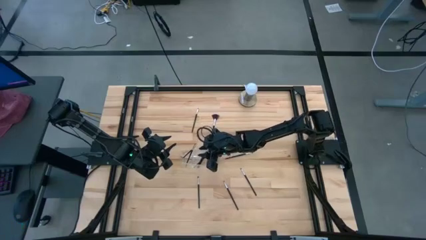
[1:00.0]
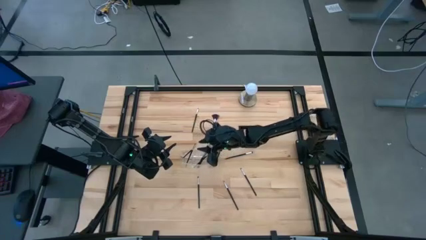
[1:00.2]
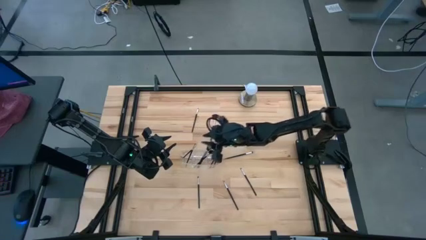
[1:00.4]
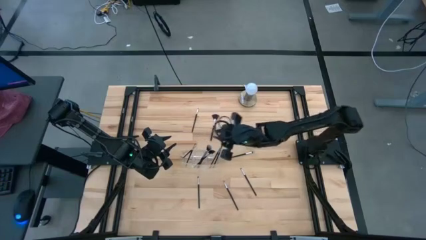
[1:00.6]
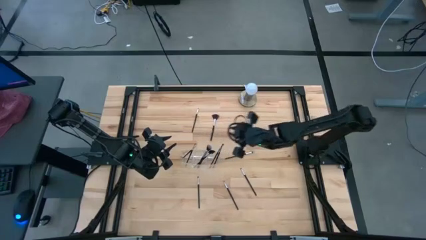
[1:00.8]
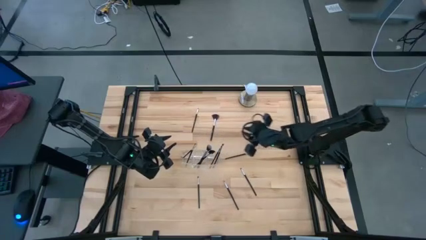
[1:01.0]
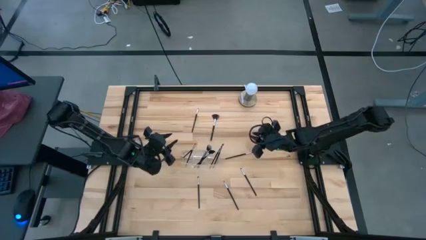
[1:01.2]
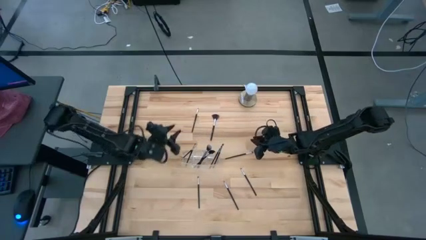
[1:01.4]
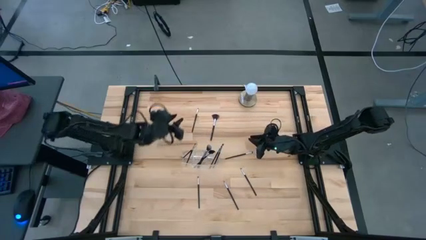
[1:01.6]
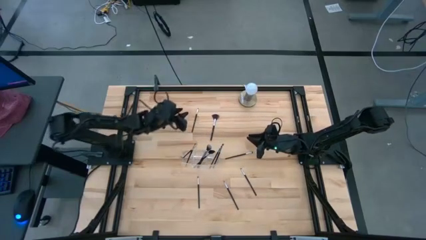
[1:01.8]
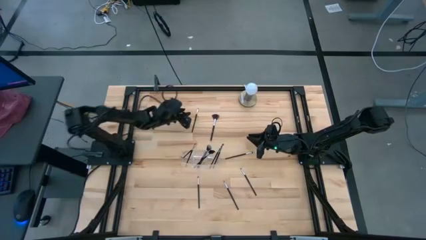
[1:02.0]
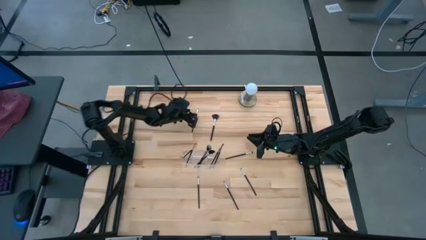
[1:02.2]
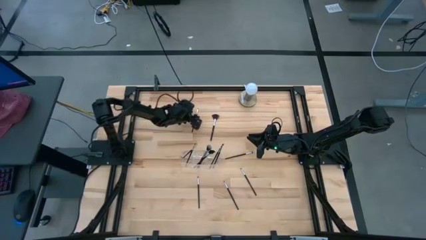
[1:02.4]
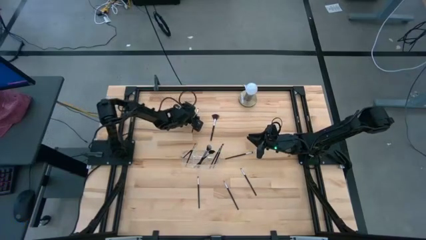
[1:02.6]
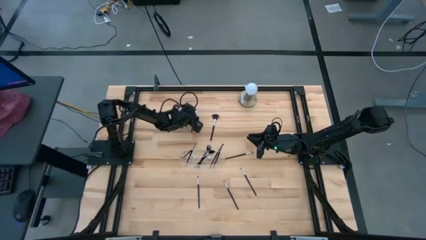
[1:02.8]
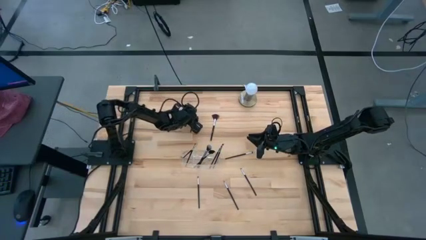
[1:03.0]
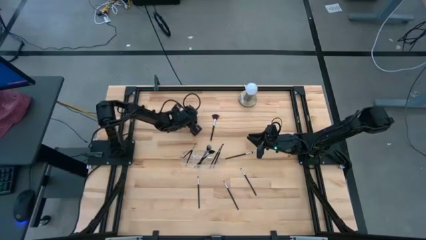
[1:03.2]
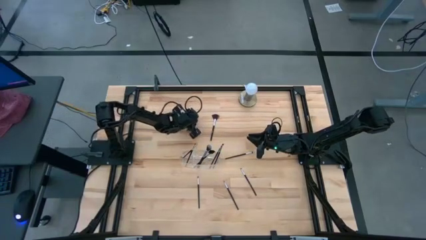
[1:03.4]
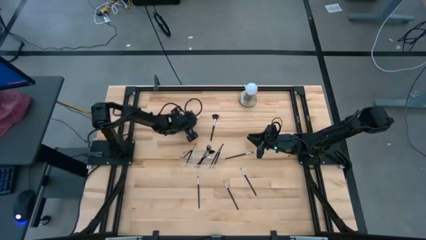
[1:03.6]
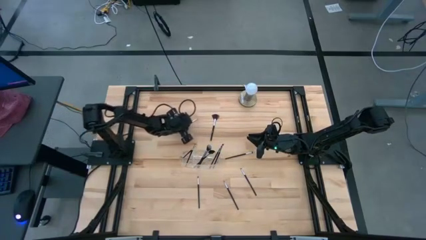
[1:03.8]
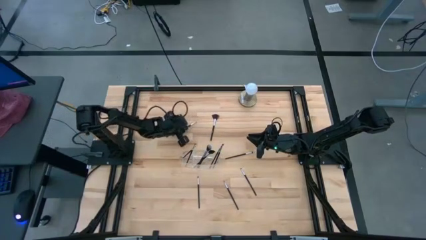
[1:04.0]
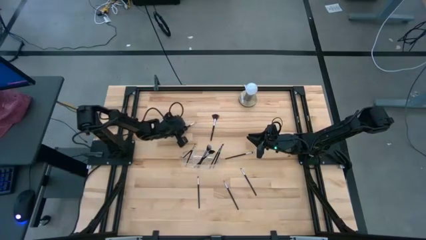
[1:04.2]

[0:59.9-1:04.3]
Task: Put items in baskets/containers
Put the eyeshadow brush into the transparent organizer

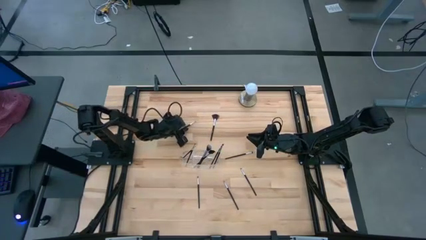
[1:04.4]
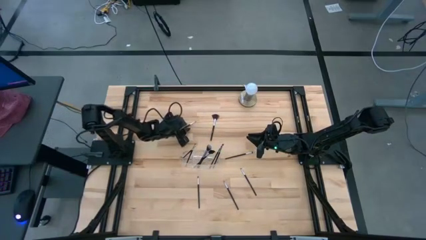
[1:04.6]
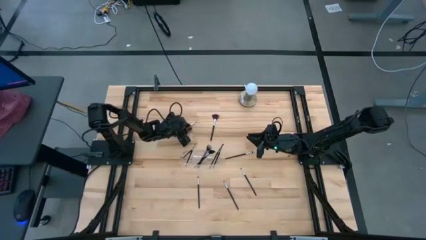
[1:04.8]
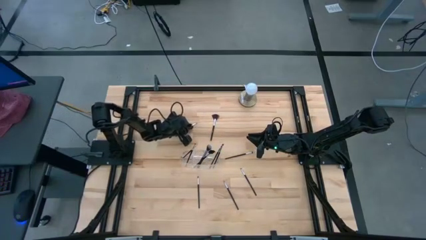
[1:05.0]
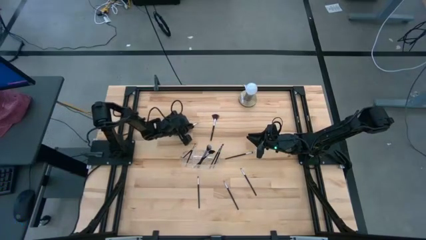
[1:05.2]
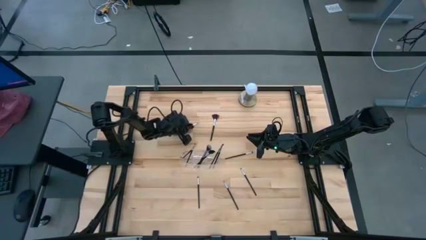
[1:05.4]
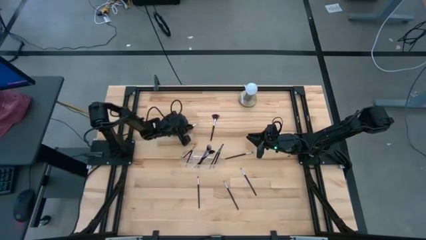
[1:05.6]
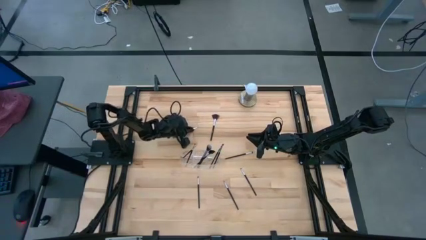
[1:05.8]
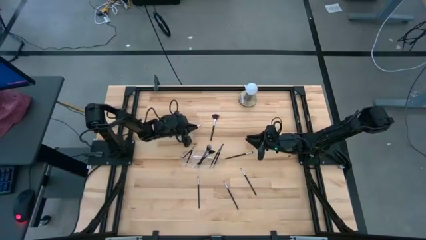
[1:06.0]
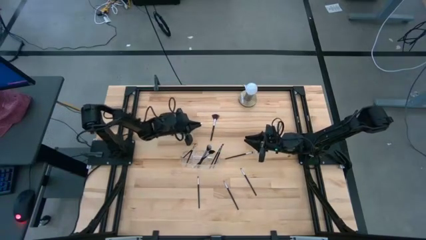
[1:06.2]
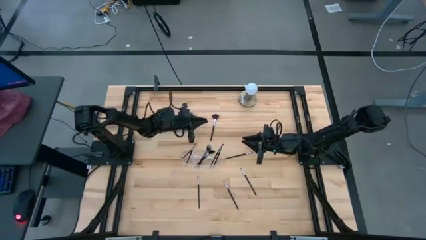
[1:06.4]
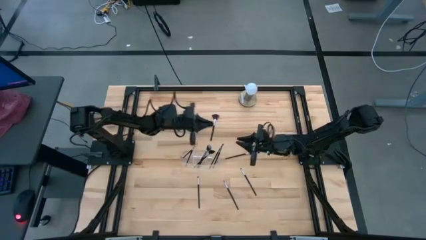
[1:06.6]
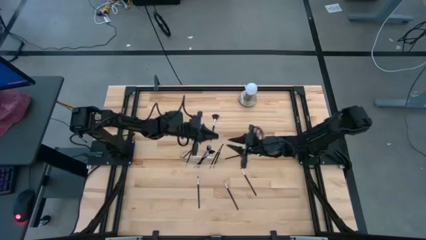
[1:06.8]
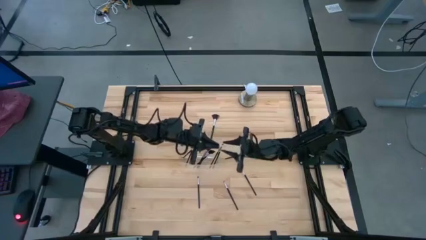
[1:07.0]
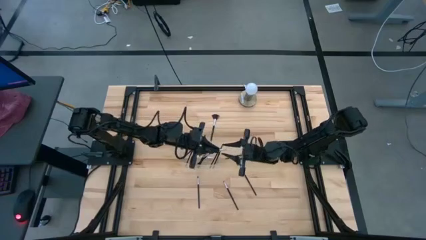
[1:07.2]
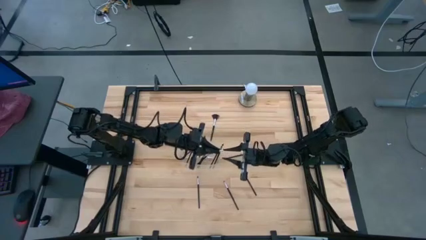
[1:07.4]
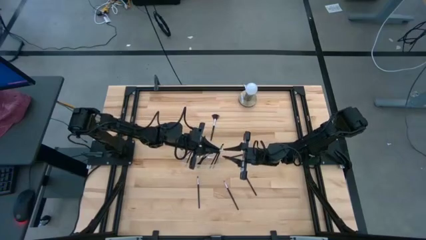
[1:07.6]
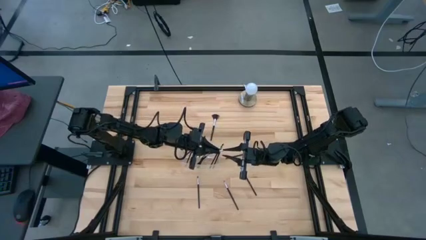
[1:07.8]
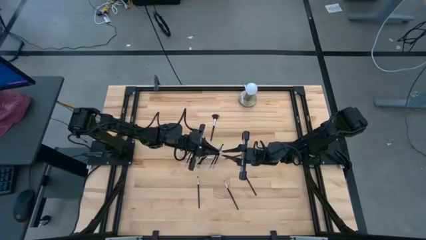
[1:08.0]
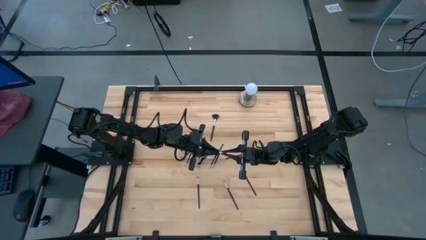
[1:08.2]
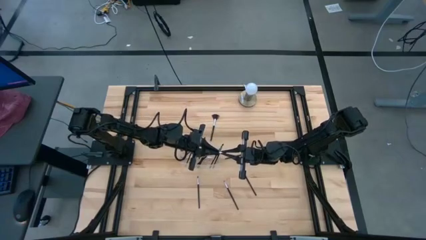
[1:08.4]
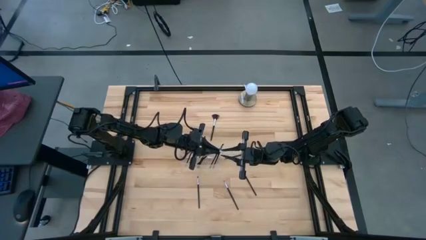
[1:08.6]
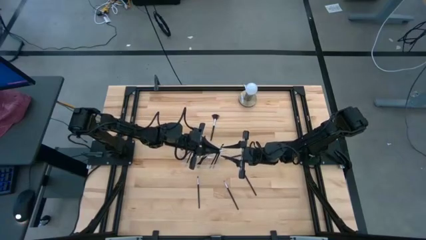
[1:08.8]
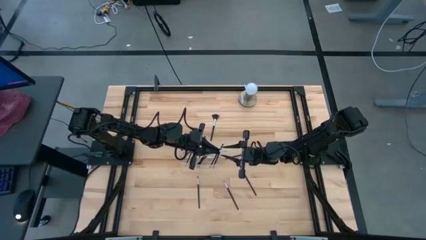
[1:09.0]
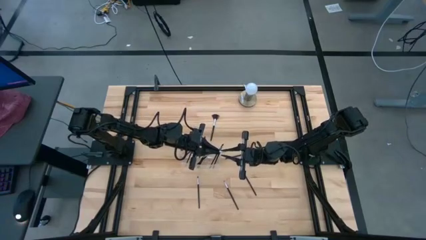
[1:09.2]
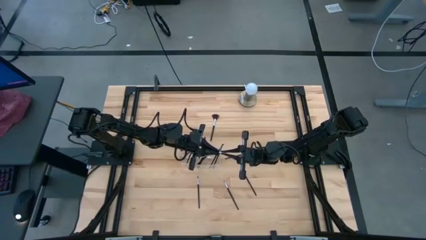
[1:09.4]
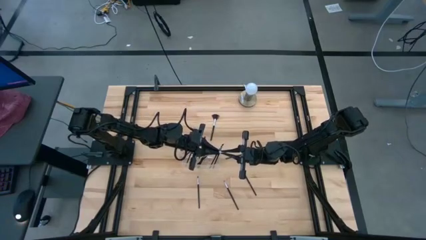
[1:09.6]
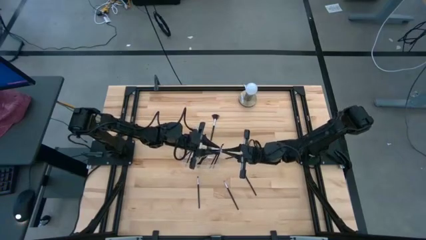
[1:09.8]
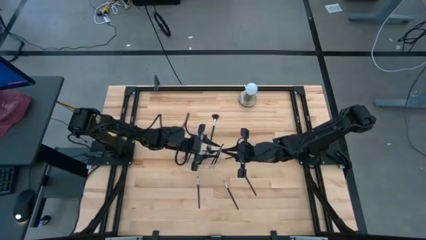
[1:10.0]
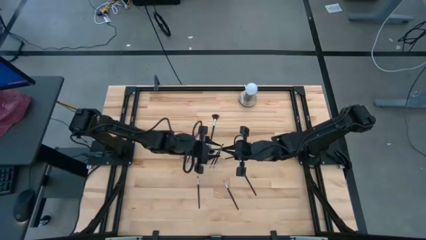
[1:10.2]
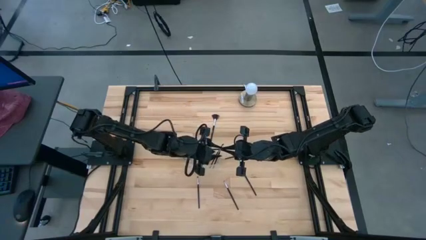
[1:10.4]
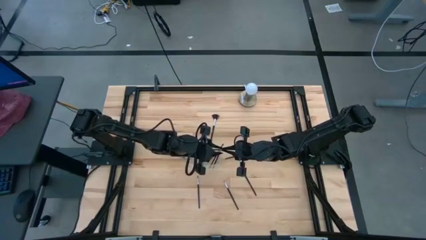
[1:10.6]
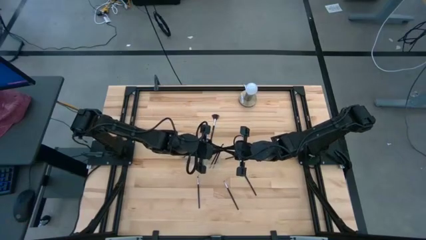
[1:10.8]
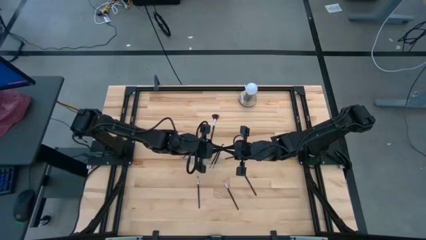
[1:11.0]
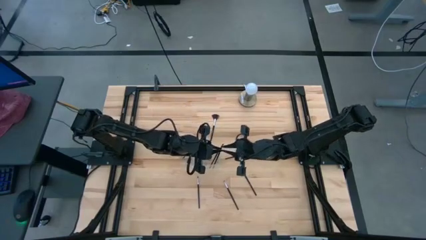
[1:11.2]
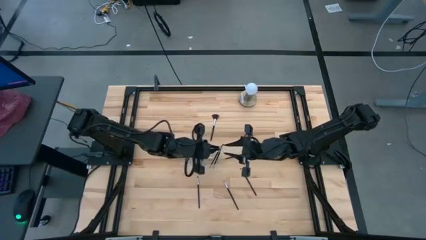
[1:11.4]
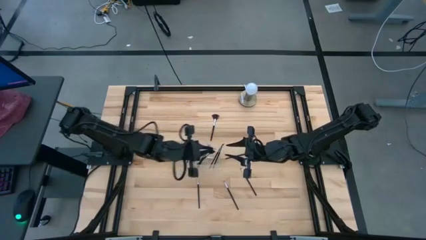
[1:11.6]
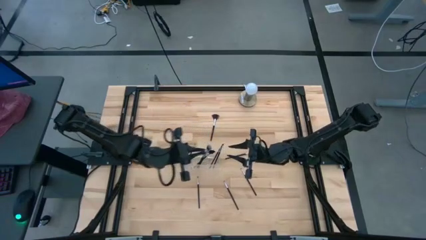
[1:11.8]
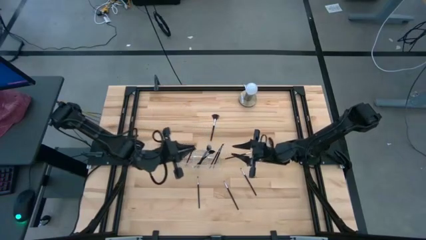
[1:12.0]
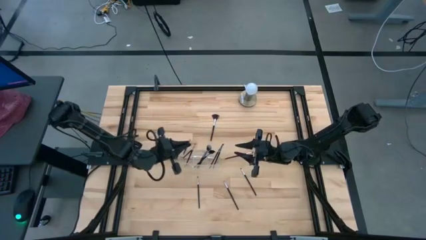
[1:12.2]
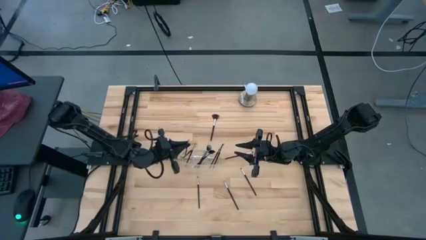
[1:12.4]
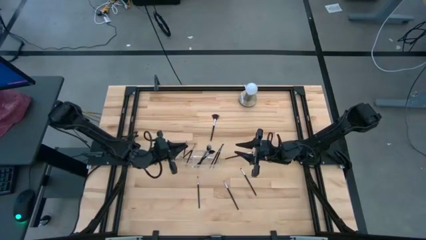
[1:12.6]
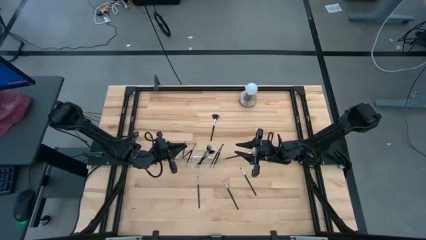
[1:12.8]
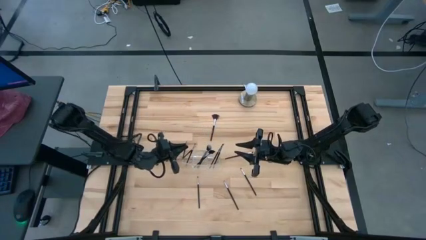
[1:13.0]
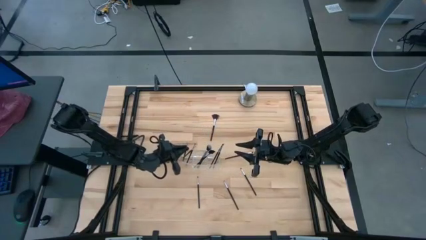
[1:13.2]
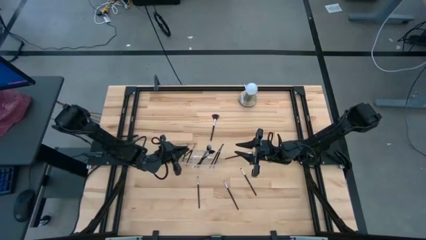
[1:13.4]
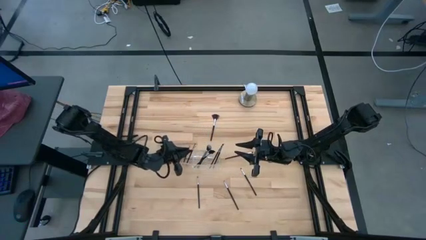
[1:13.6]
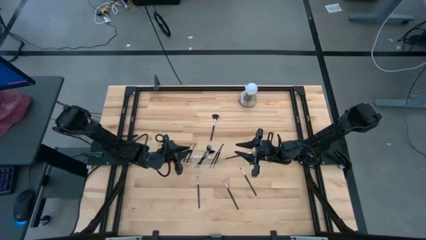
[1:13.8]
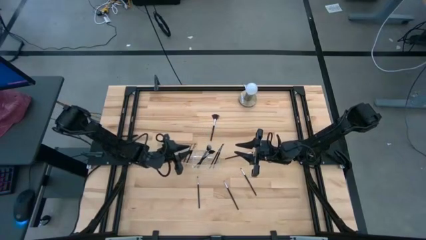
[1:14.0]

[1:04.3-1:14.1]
Put the eyeshadow brush into the transparent organizer

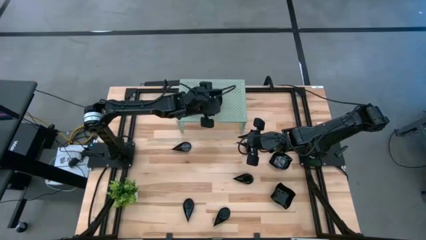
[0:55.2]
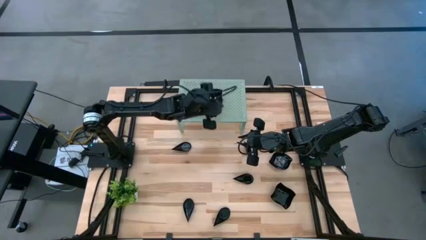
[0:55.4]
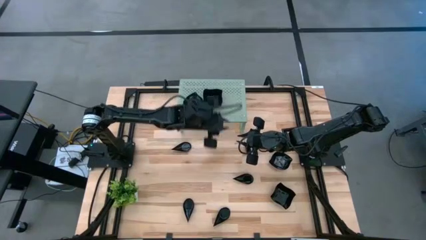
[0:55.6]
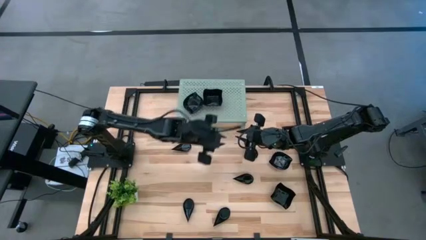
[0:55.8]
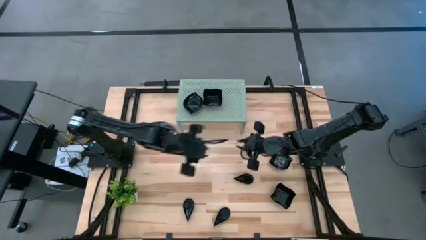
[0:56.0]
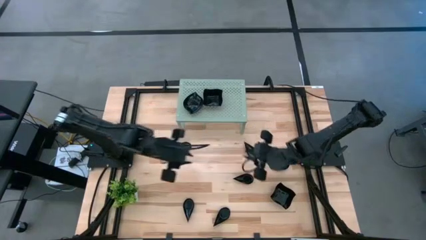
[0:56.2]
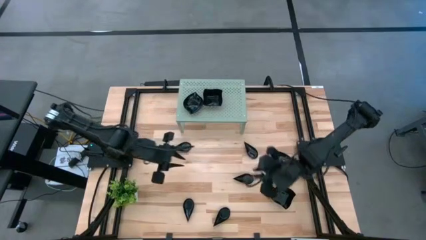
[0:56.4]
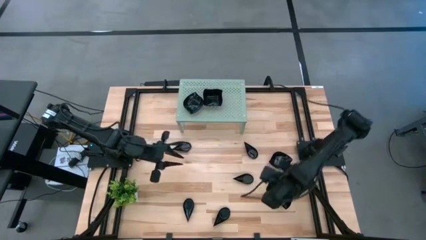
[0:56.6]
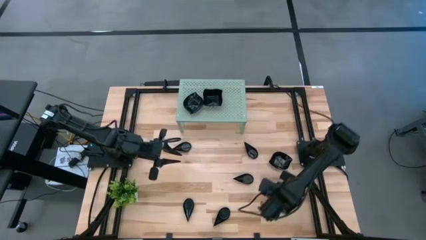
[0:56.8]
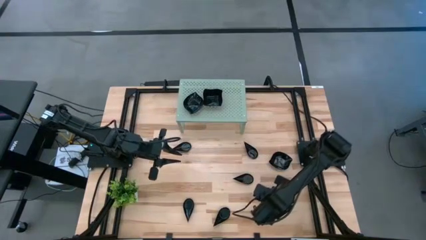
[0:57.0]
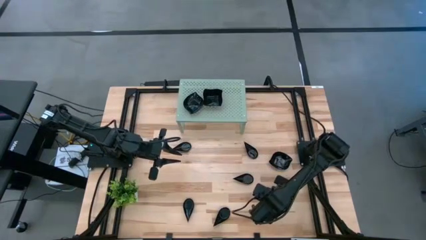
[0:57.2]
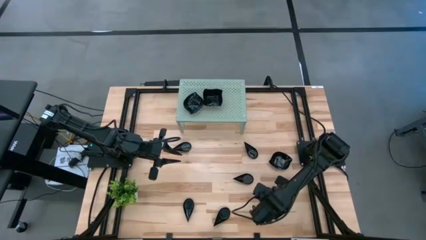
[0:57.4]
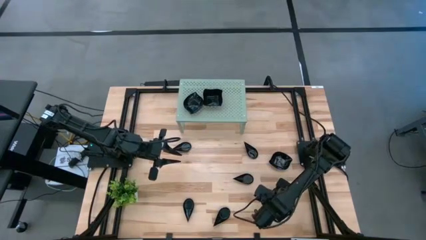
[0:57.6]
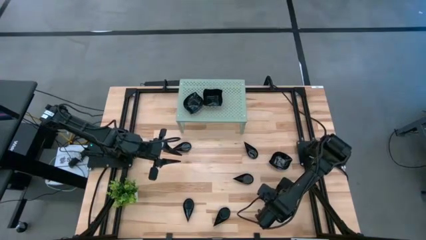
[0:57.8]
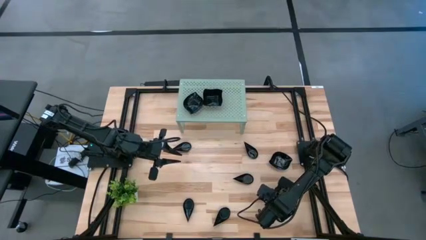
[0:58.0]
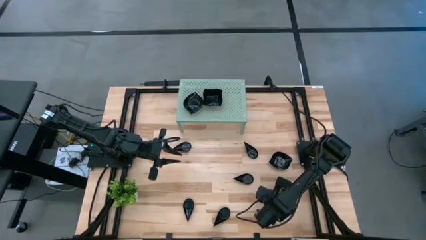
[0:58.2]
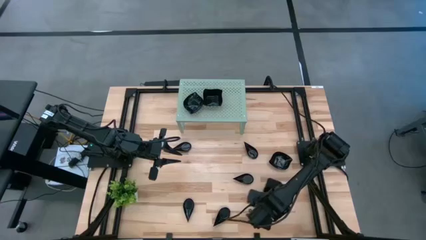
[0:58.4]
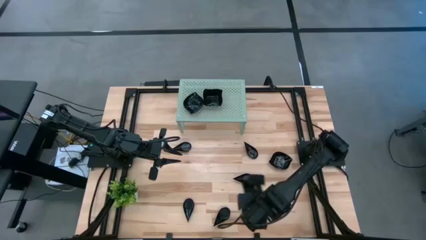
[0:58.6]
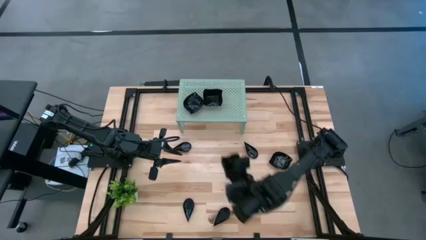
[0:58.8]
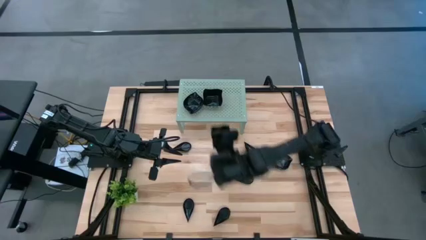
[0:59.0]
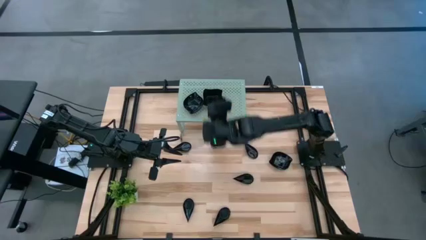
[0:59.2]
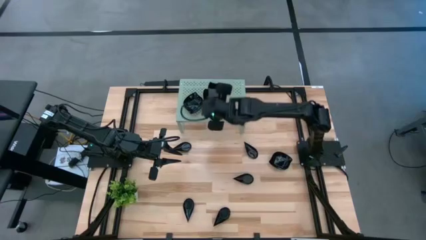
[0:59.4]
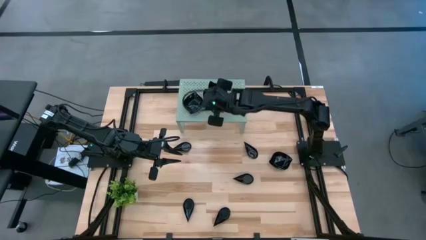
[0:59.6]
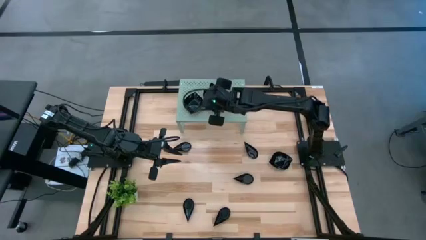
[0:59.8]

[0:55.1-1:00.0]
Task: Pick & Place Mini shaped plates
Stack the distorted square plate on top of the other distorted square plate on the shelf
